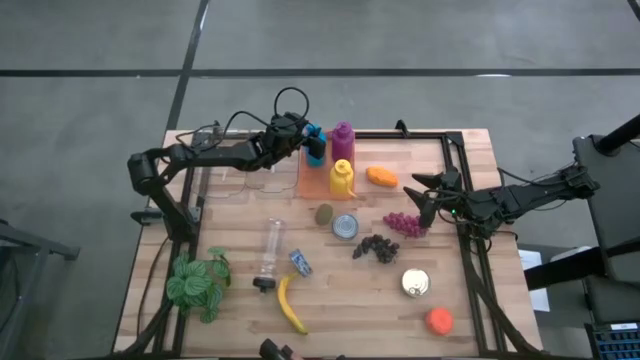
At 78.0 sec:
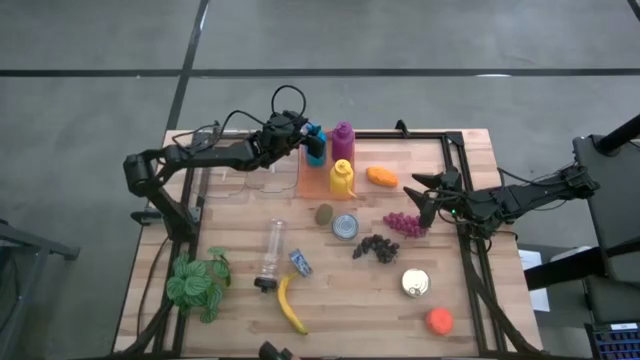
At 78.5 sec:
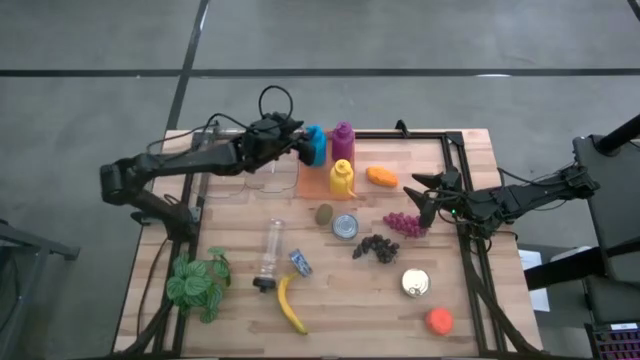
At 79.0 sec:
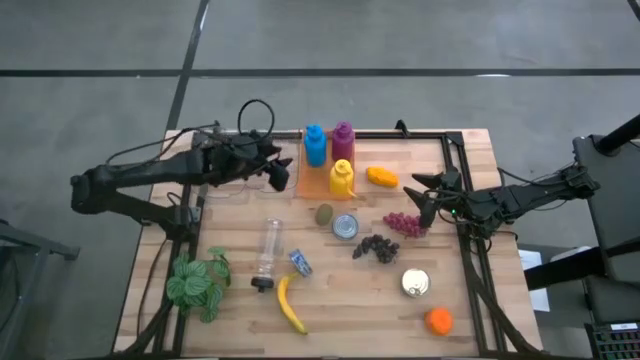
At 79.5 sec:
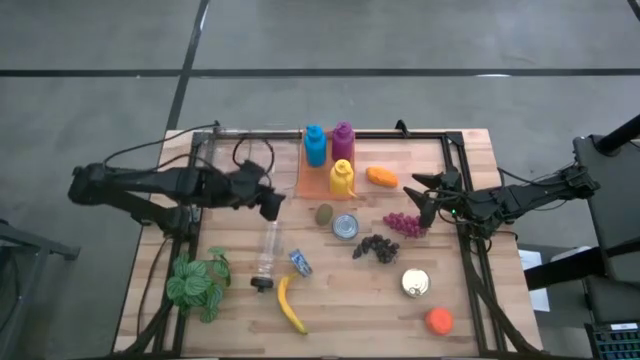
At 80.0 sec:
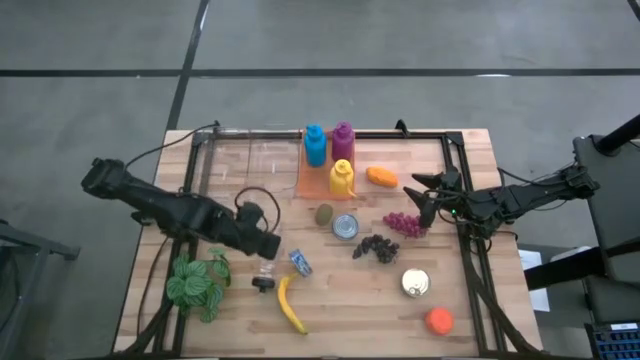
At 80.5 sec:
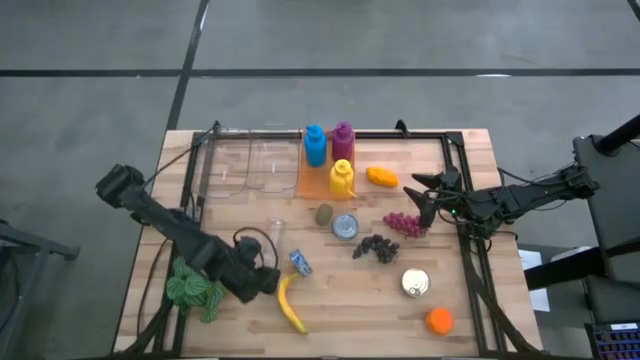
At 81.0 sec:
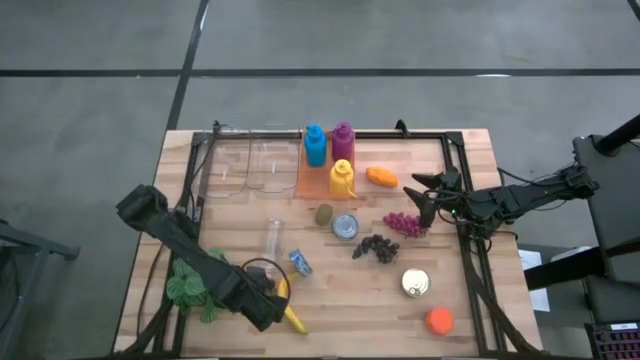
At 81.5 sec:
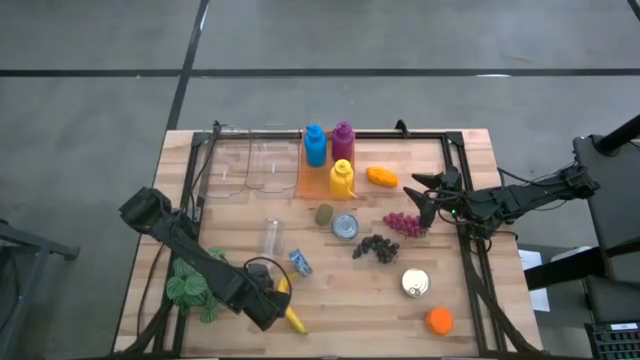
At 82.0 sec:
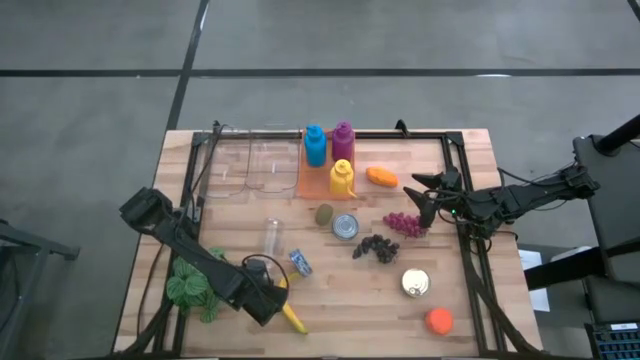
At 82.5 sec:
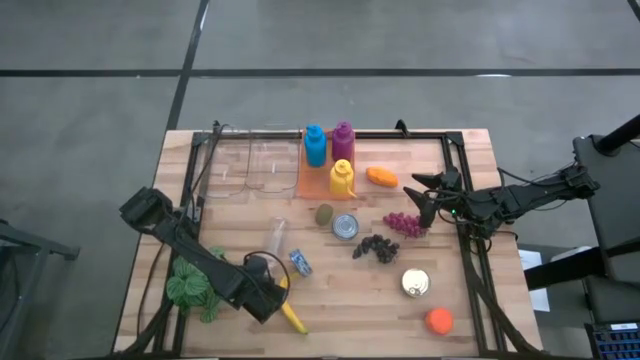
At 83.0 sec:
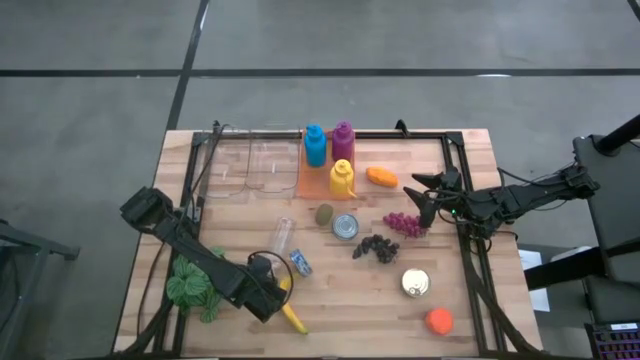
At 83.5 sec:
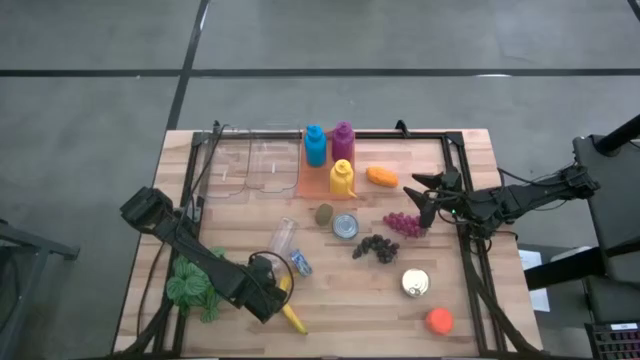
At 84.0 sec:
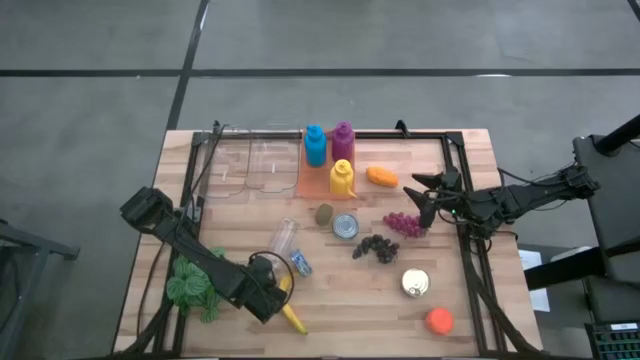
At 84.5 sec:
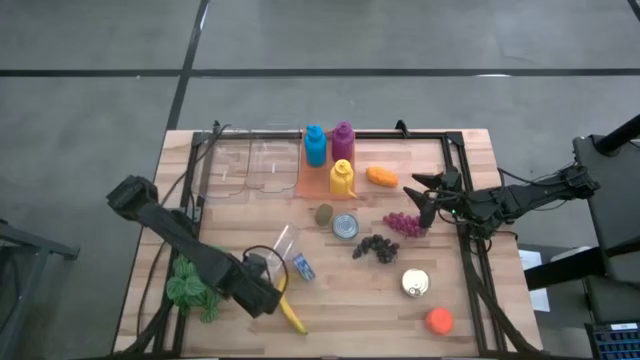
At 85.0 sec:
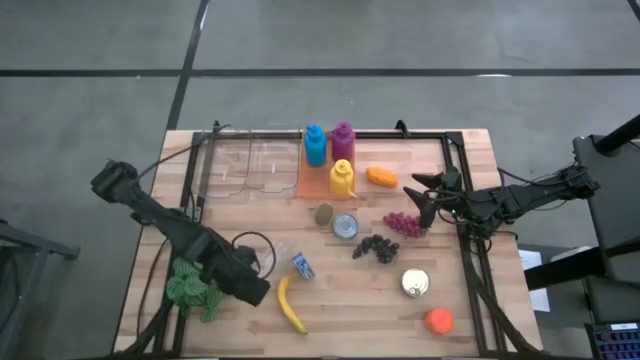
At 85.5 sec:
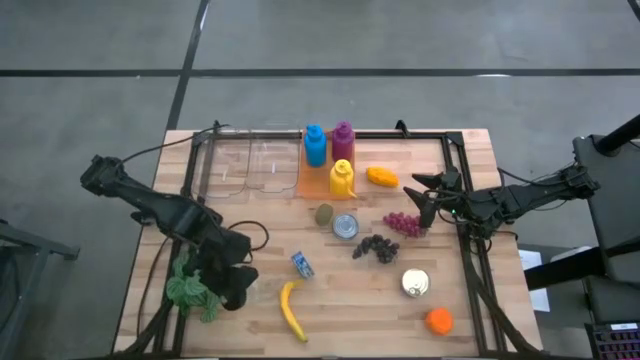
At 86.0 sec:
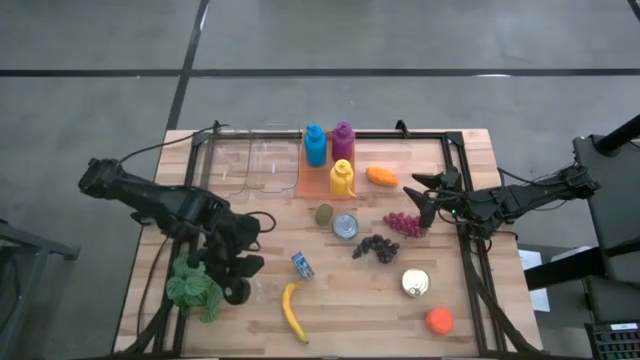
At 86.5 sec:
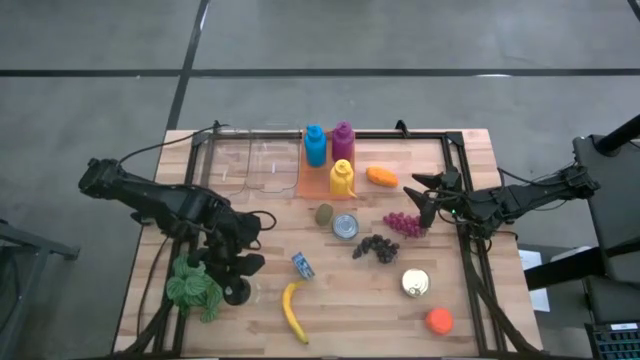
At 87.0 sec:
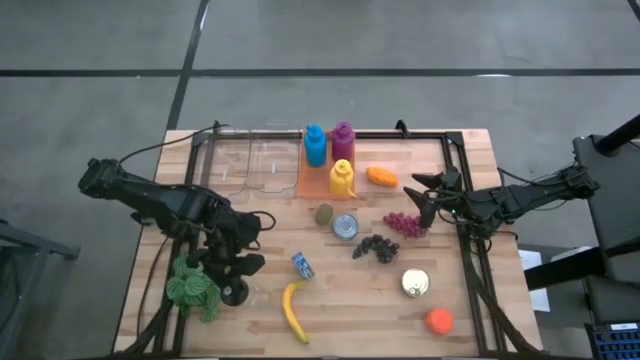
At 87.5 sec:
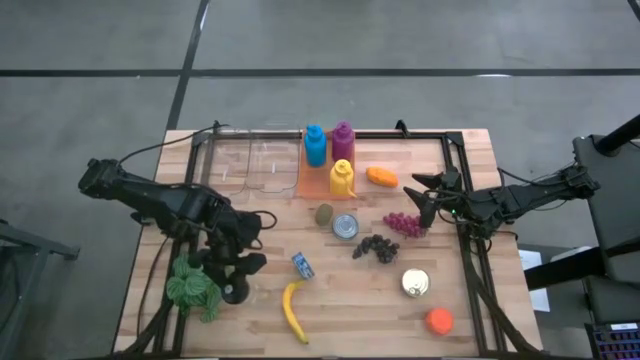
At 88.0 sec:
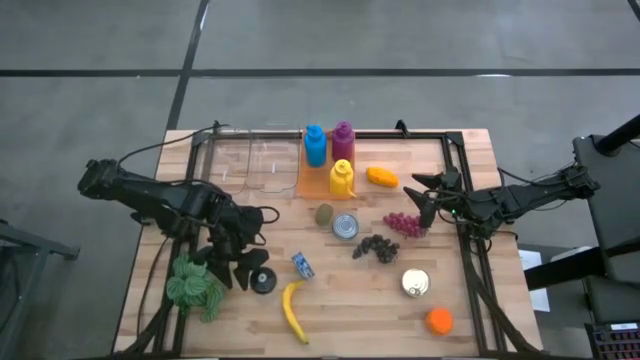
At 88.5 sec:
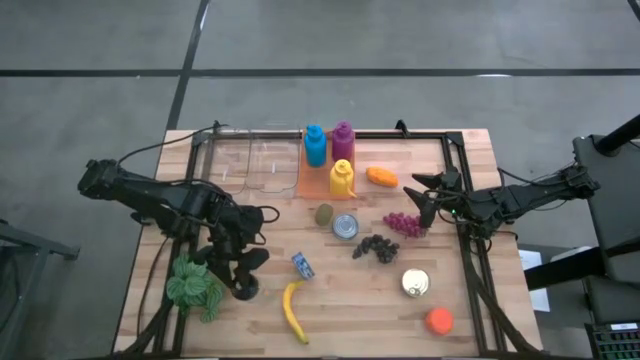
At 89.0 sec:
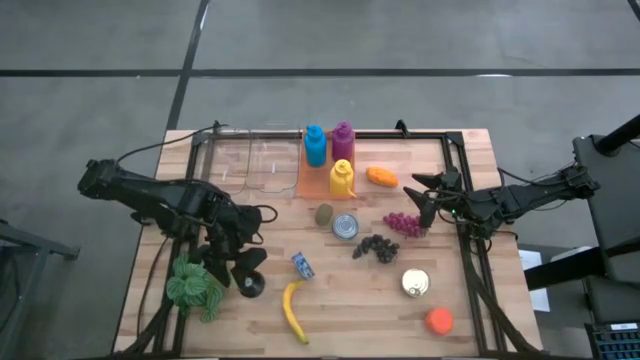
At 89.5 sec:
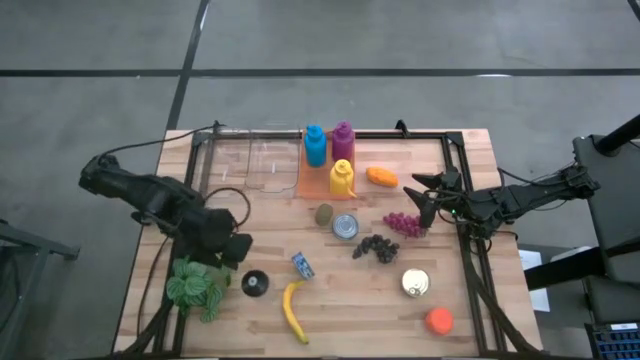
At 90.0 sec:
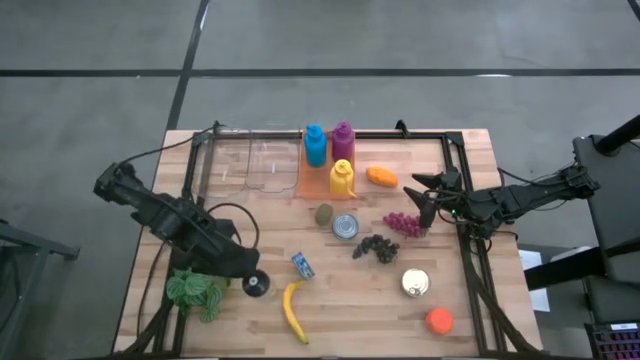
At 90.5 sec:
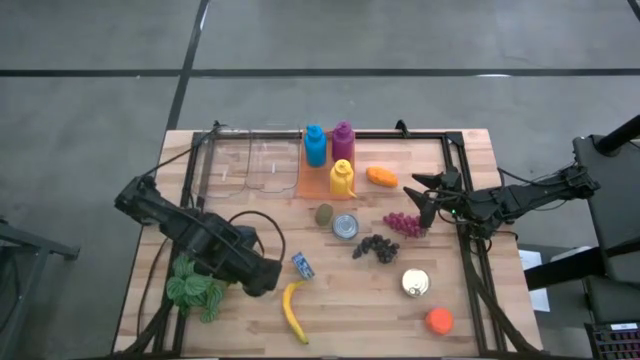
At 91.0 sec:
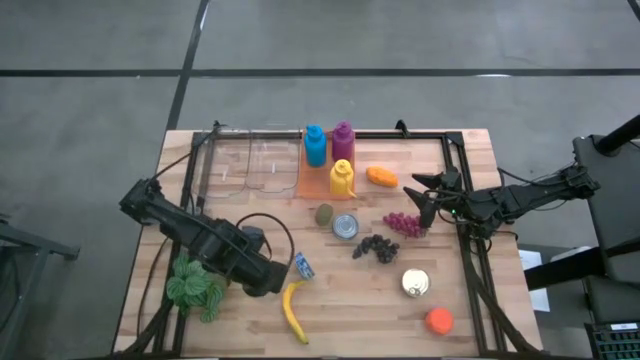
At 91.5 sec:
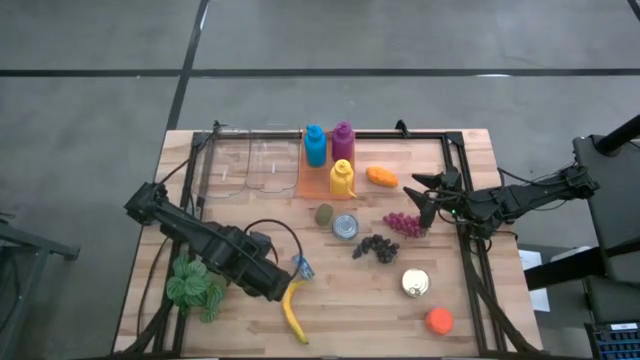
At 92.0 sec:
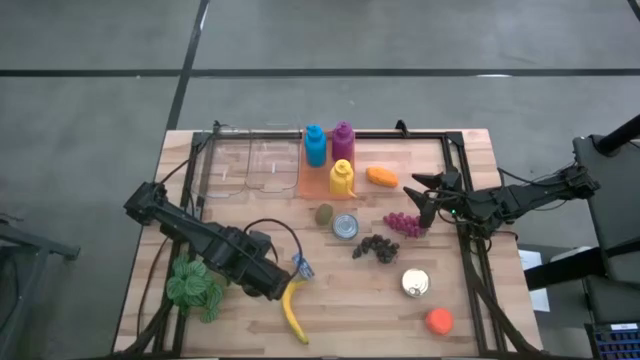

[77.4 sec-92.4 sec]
Task: Pick & Place Food Item
Put the transparent tumbler into the orange bin

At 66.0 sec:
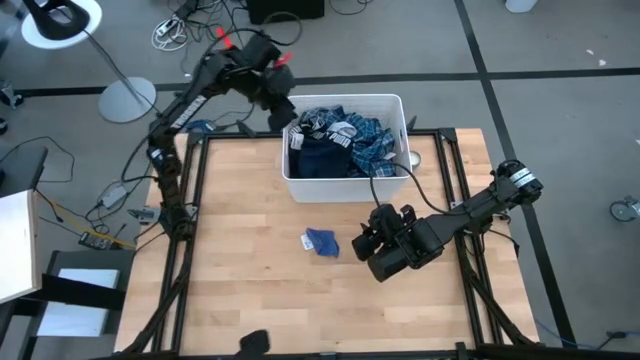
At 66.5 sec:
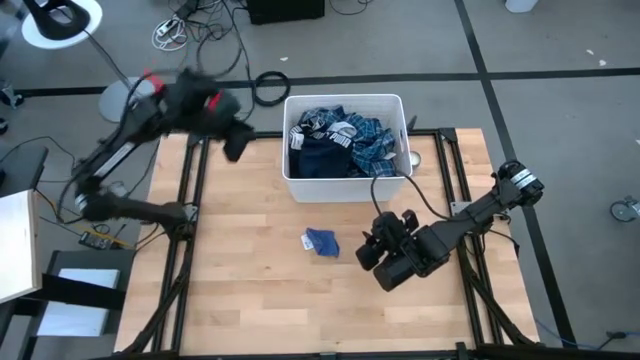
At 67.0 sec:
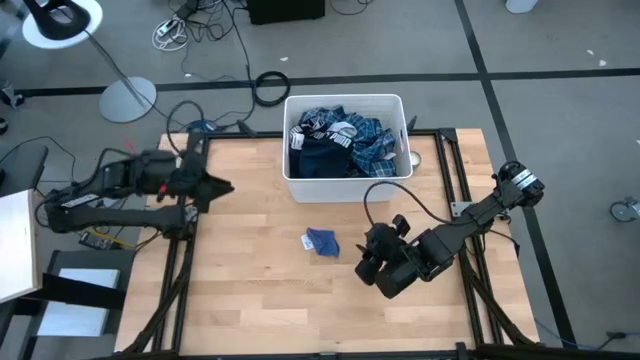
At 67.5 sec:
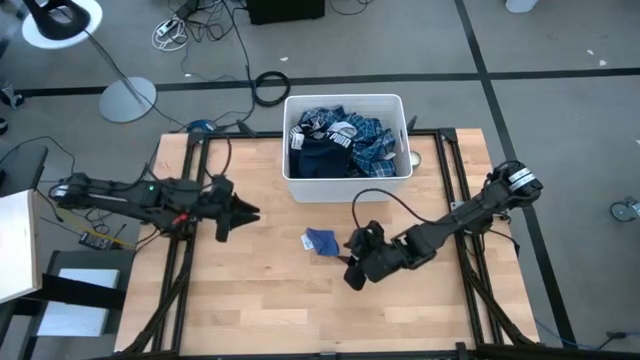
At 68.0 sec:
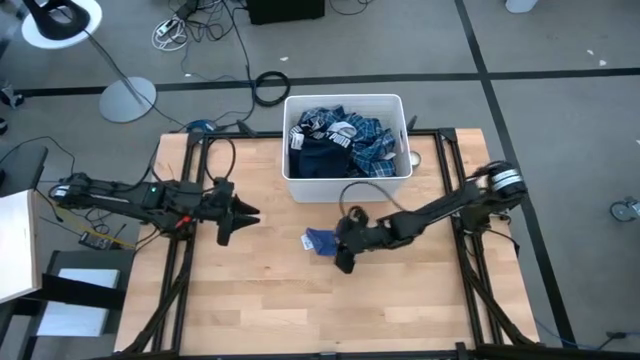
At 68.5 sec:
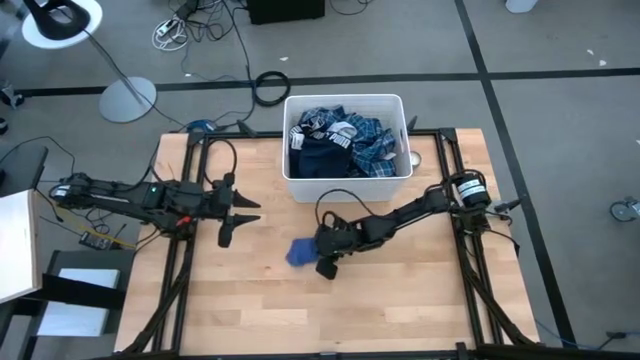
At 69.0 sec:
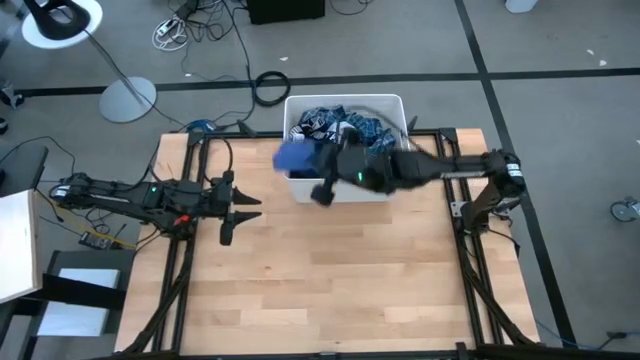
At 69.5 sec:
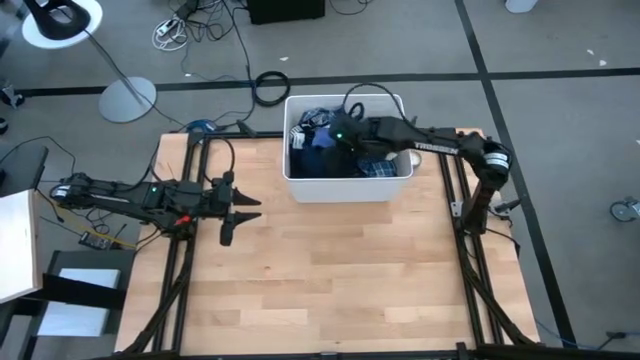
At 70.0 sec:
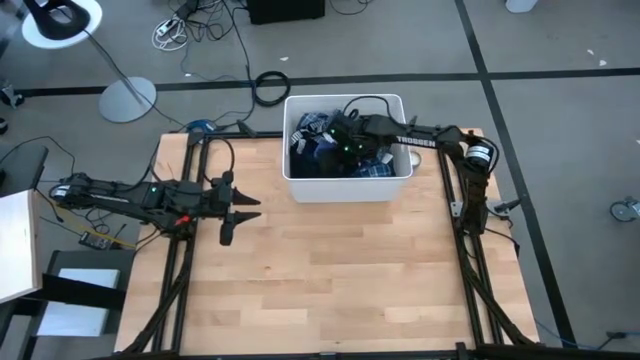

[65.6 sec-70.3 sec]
Task: Sort clothes
Put the blue sock into the laundry bin
